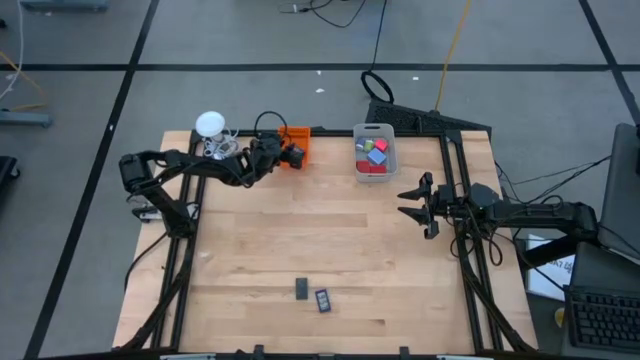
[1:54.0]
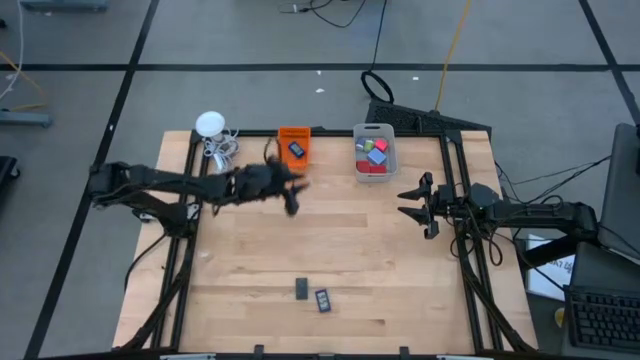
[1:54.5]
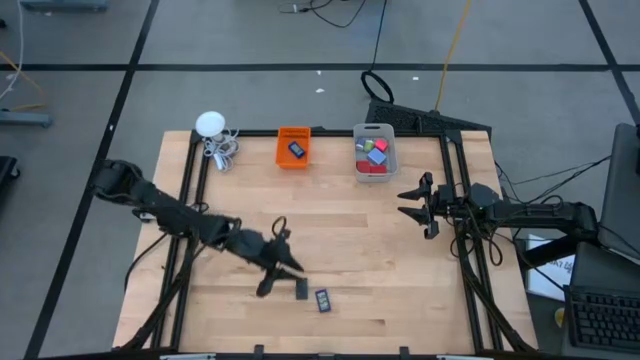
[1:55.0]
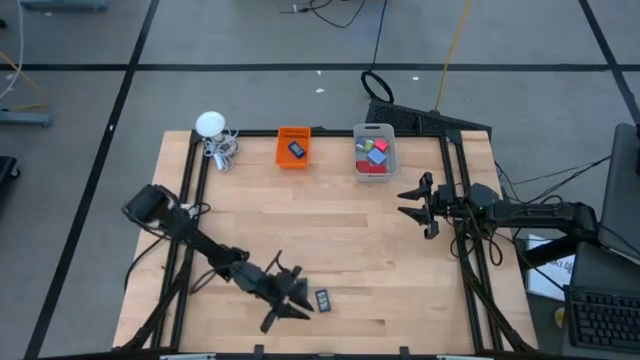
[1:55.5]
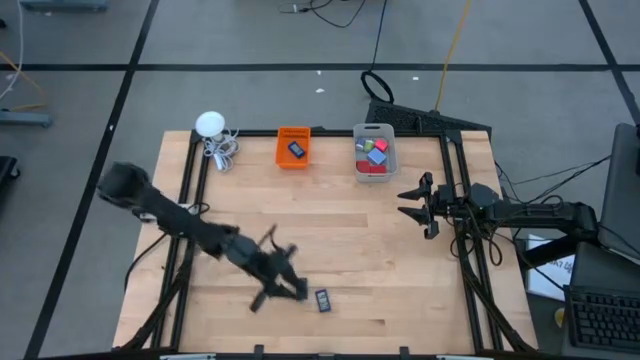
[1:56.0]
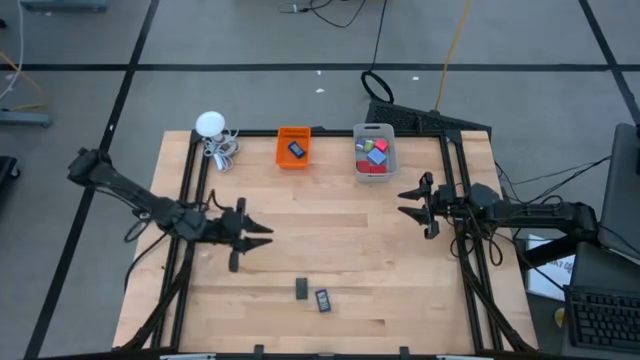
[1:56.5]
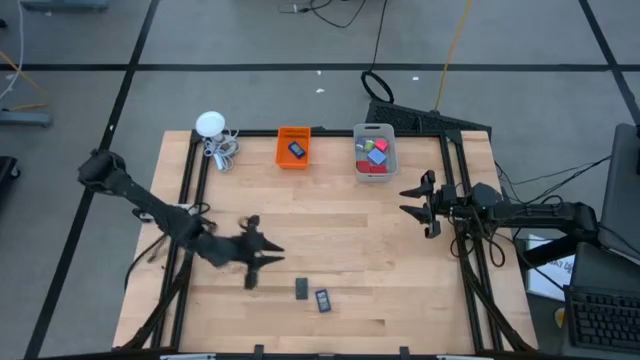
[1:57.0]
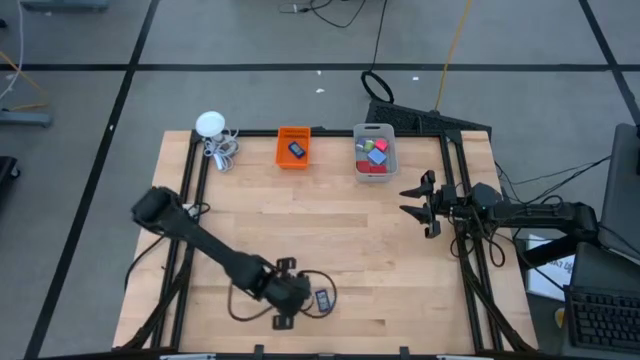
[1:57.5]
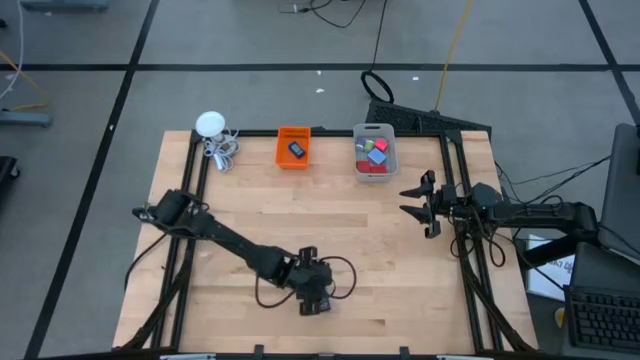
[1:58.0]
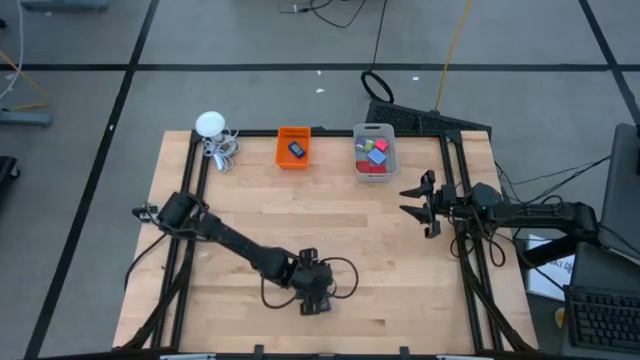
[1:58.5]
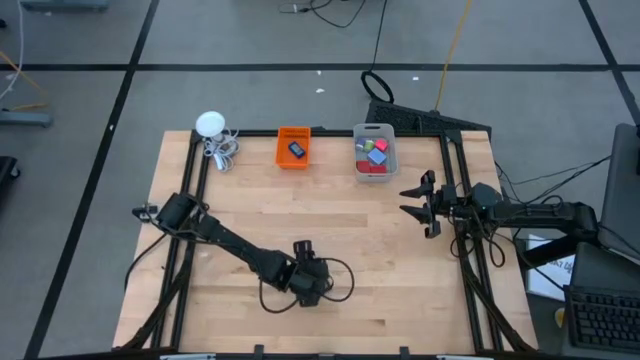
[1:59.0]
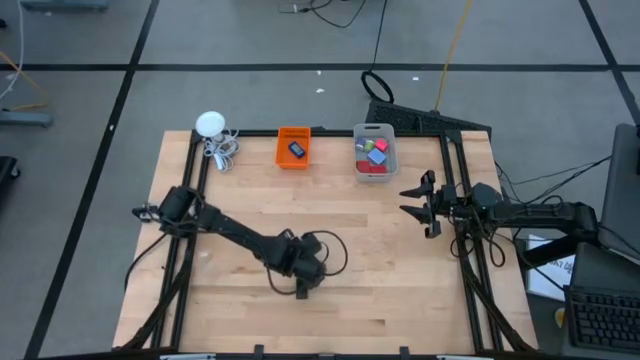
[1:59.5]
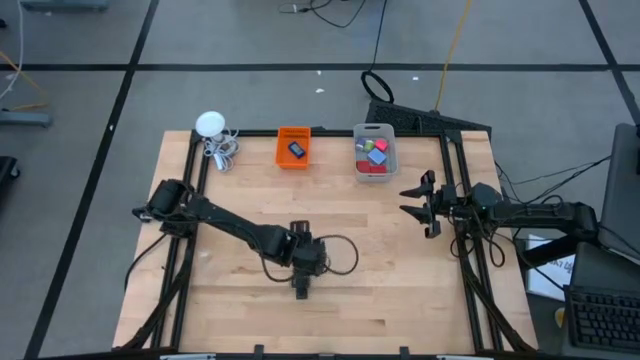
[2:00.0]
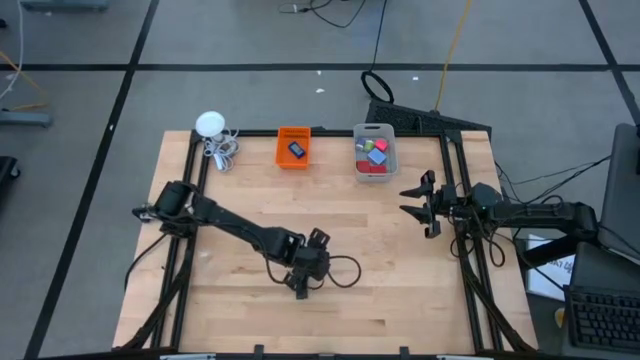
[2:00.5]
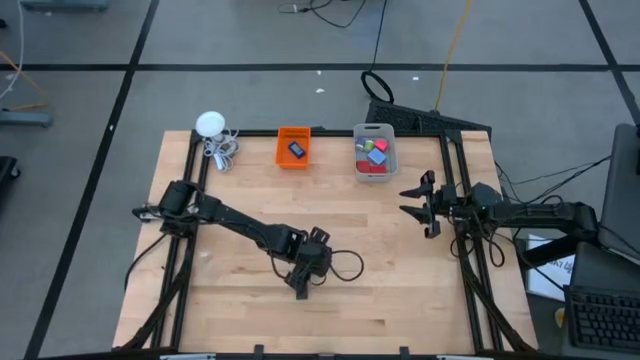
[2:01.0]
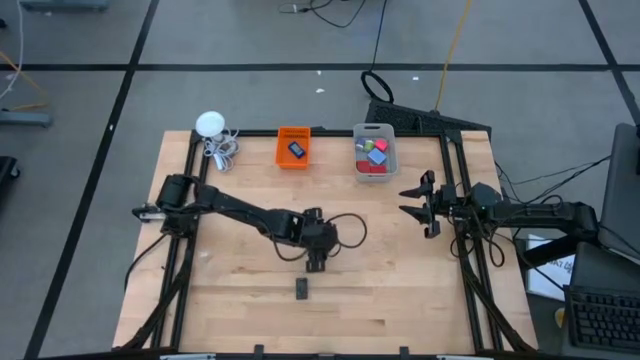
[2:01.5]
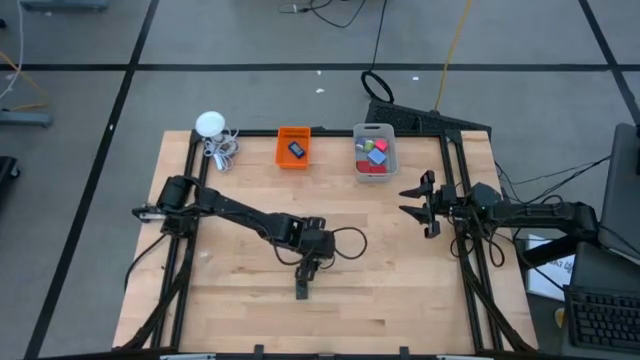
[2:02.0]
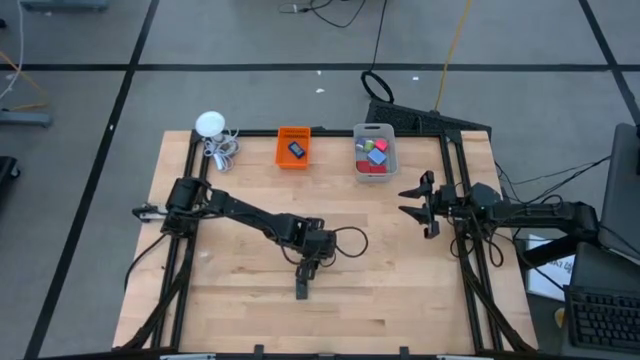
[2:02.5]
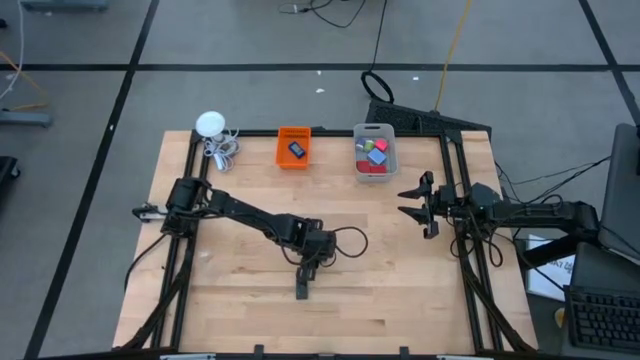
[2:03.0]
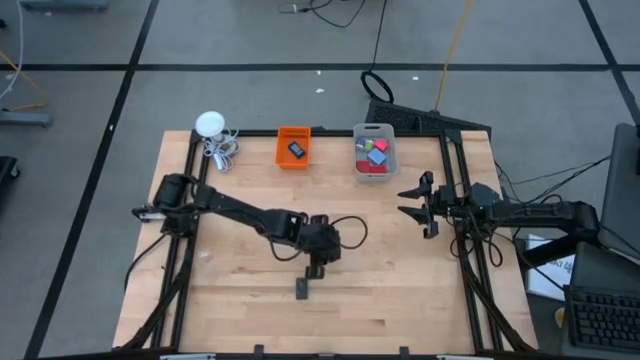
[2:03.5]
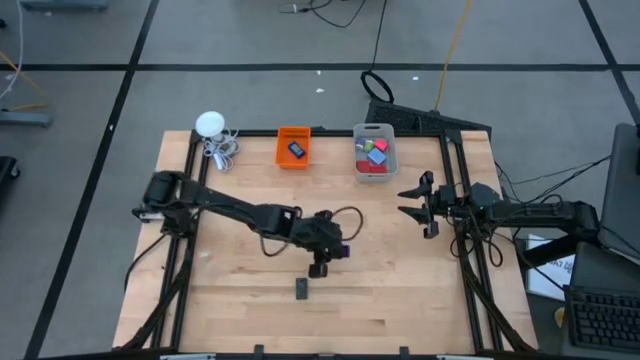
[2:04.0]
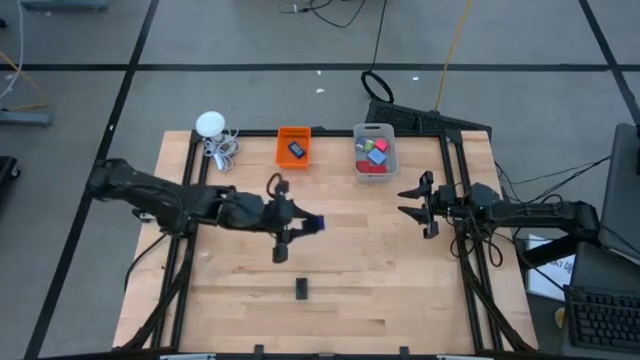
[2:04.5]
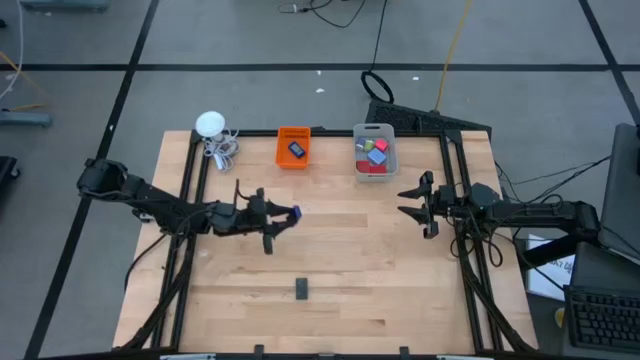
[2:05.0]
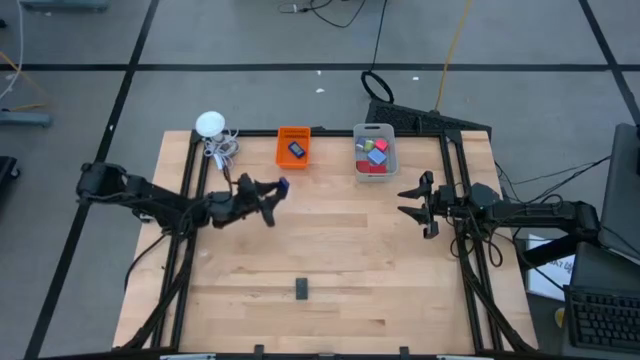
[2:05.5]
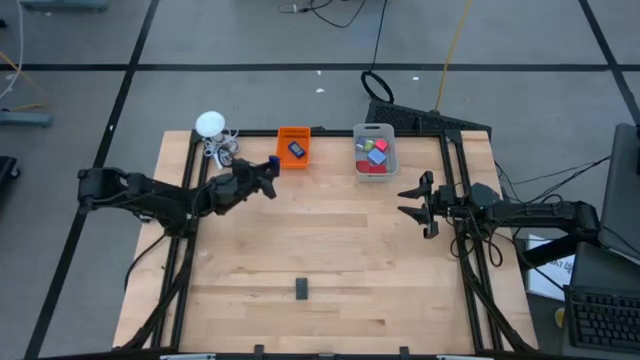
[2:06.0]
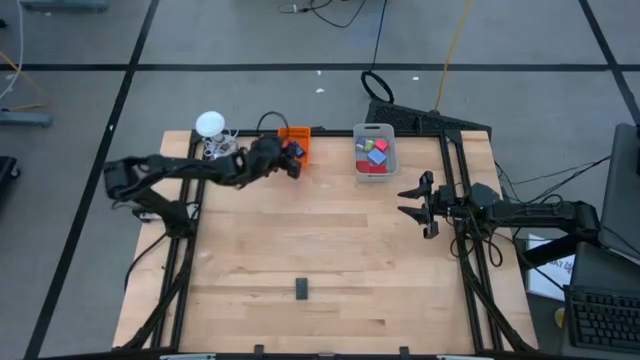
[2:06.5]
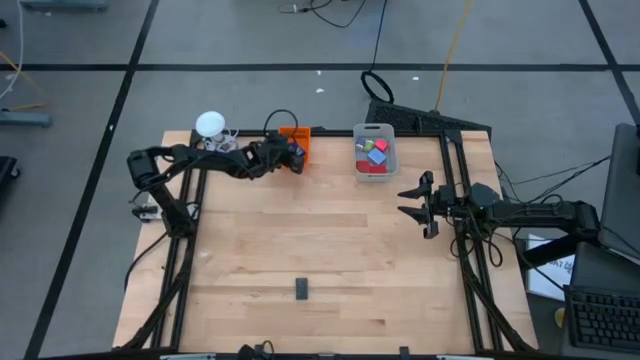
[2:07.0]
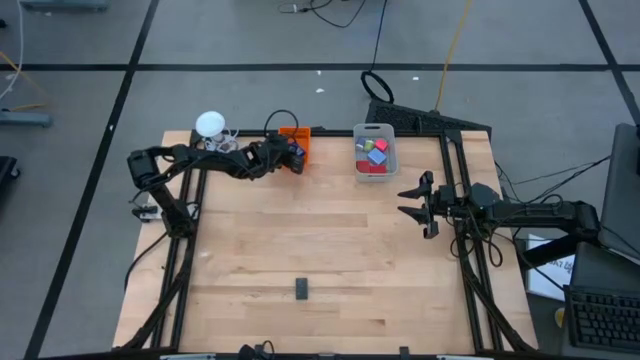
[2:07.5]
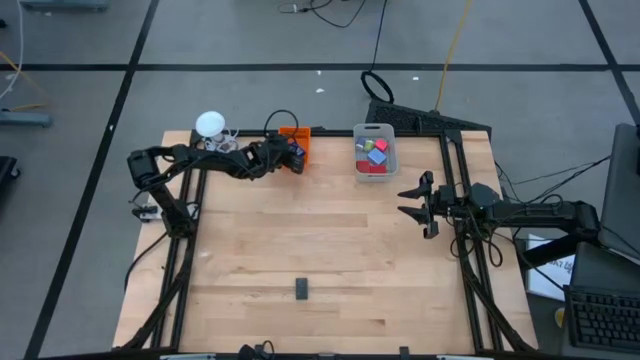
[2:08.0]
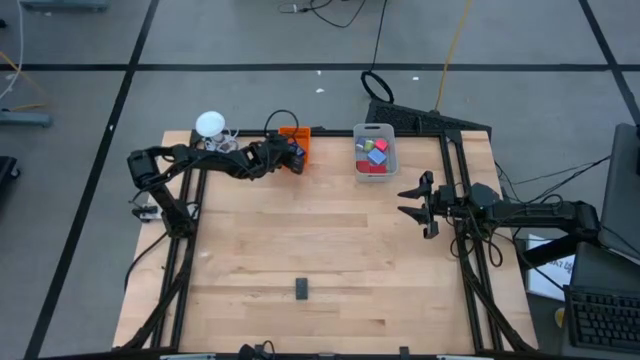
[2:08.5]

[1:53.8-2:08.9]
Task: Pick & Place Office items
Put the blue digital timer into the orange bin

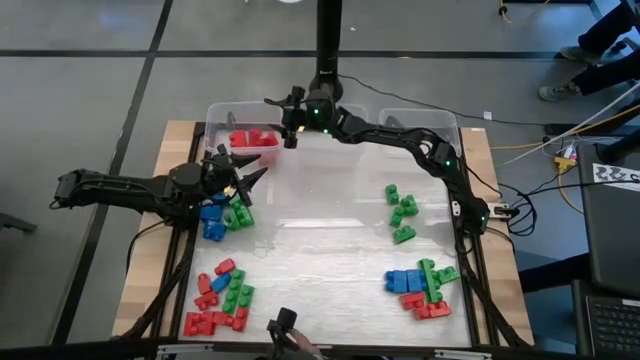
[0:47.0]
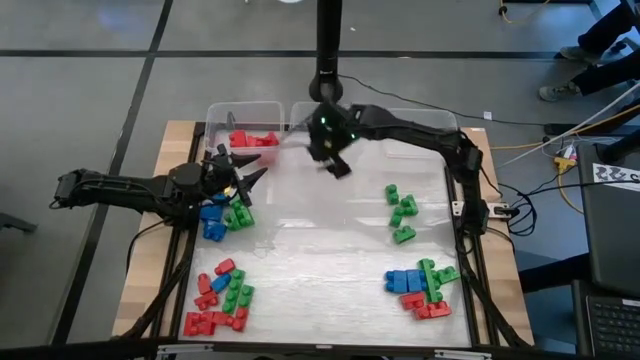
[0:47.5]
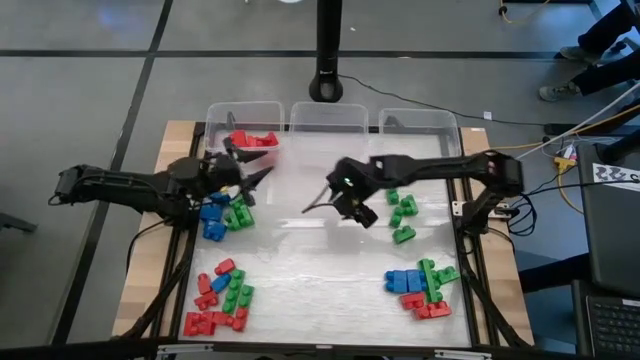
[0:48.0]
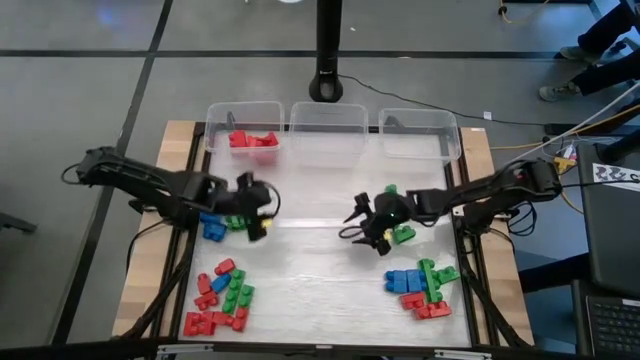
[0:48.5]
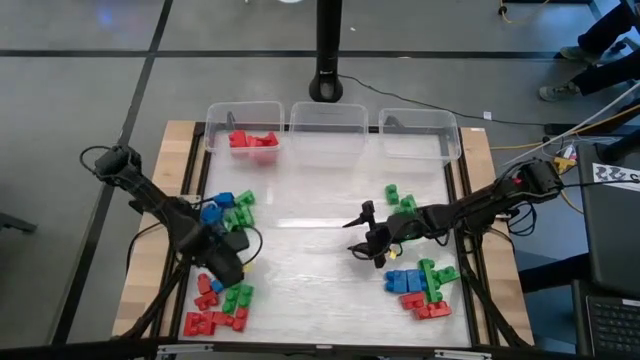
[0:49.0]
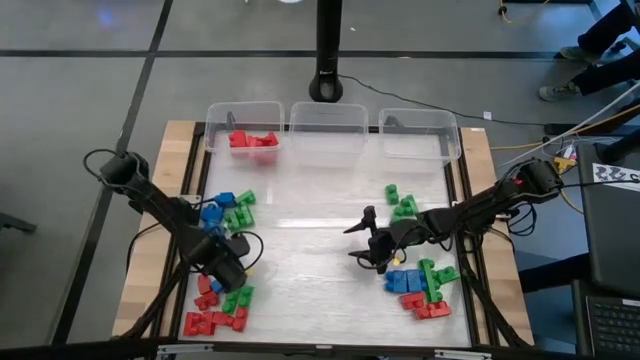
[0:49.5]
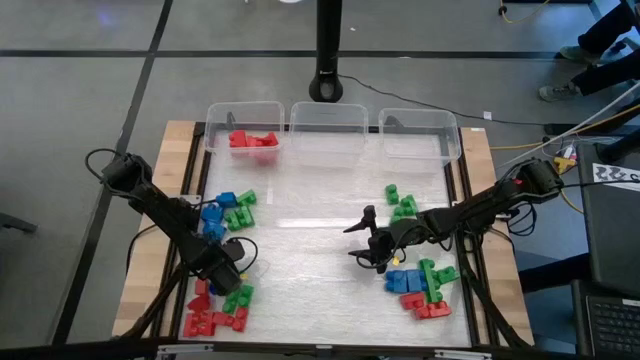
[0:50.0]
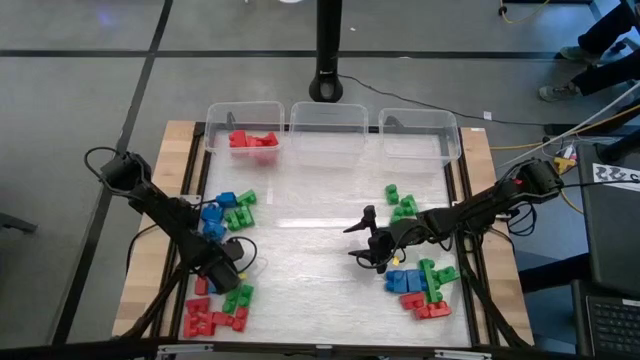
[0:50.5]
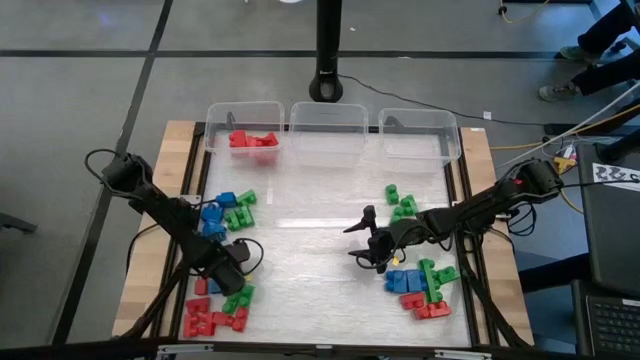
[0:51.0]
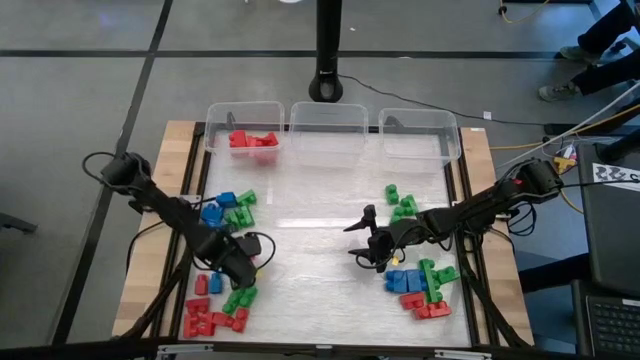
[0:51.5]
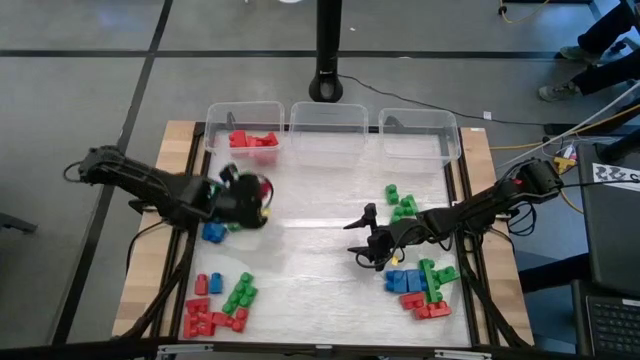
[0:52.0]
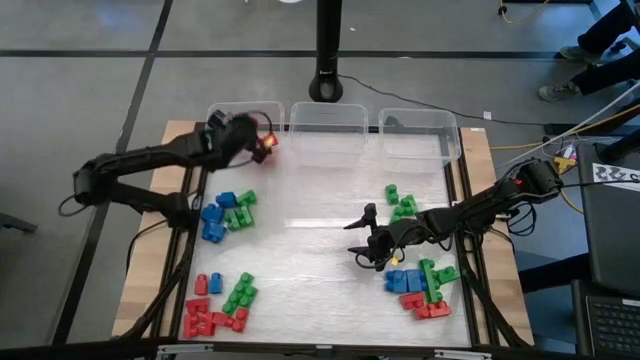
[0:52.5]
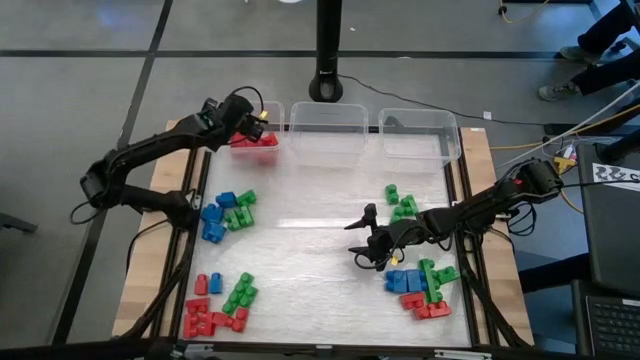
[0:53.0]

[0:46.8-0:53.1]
Task: Sort blocks
Put the red game piece into the left transparent bin
